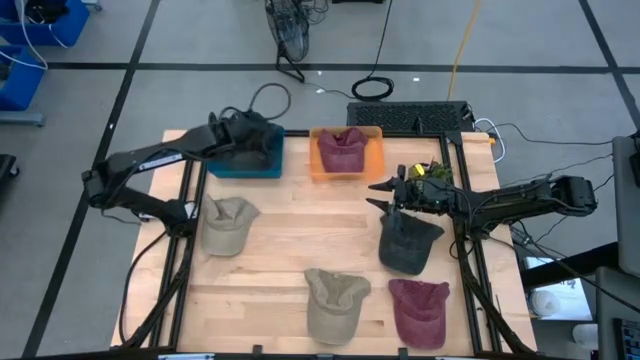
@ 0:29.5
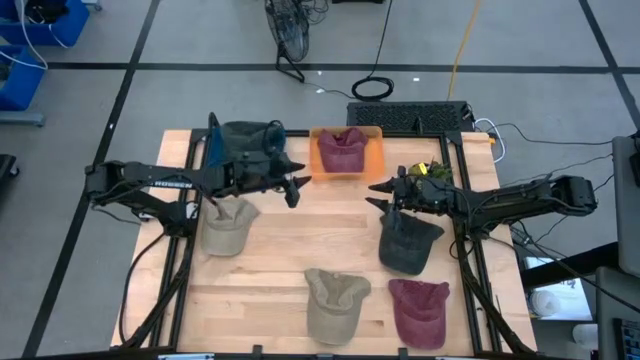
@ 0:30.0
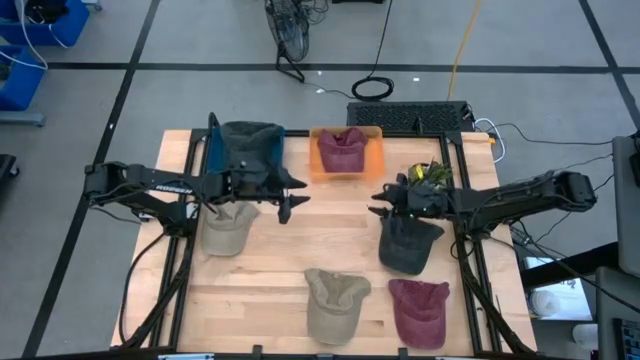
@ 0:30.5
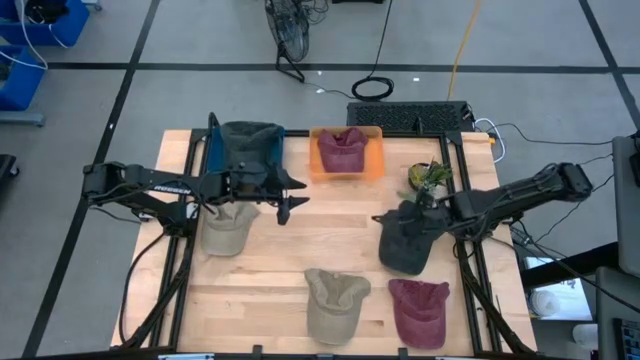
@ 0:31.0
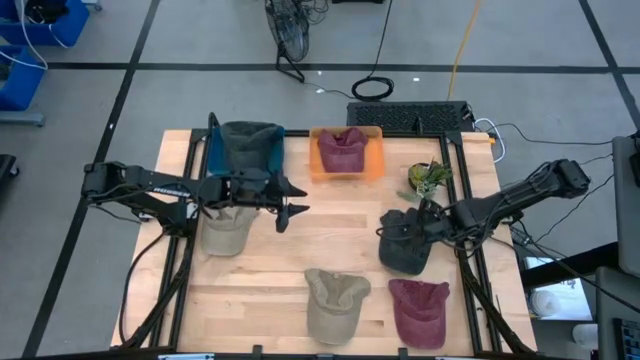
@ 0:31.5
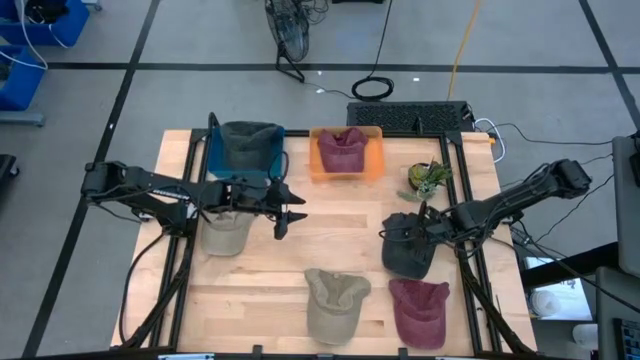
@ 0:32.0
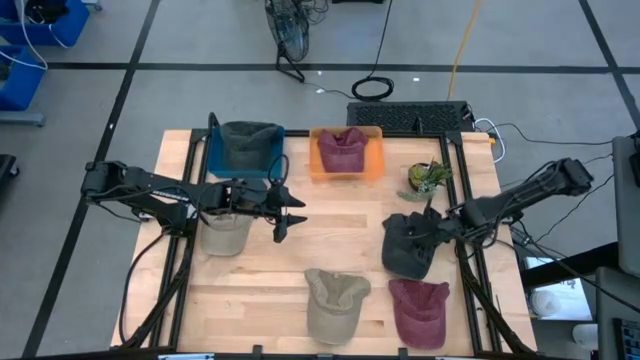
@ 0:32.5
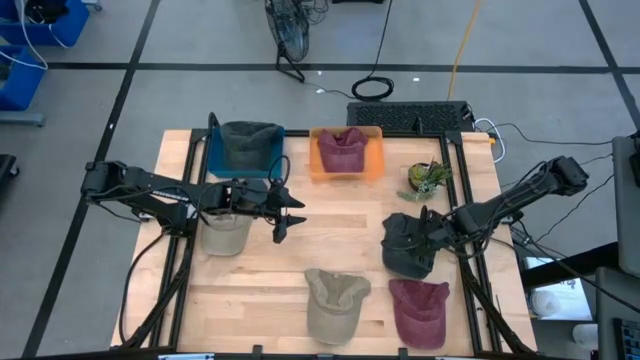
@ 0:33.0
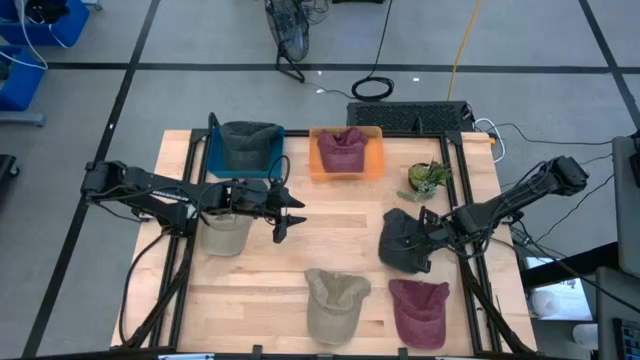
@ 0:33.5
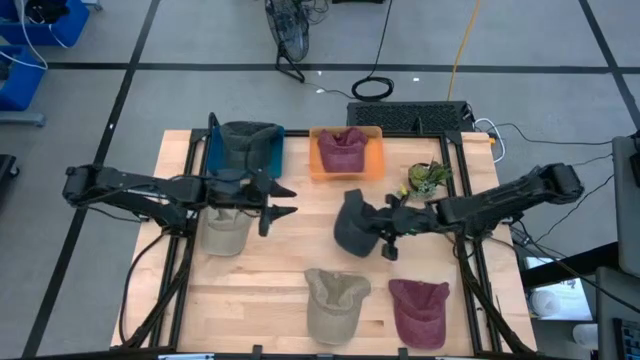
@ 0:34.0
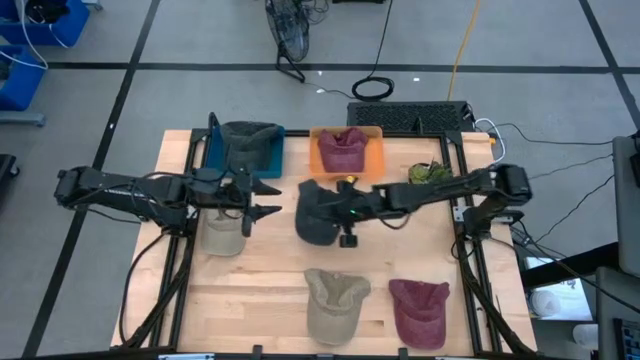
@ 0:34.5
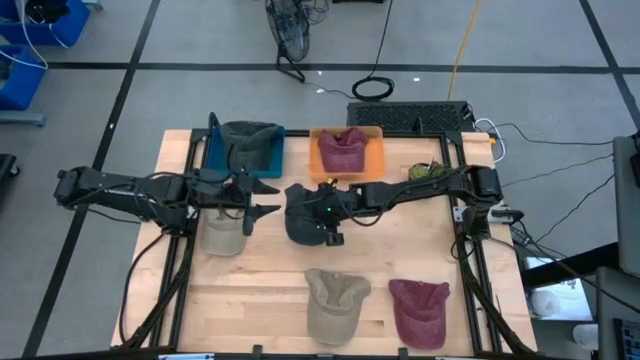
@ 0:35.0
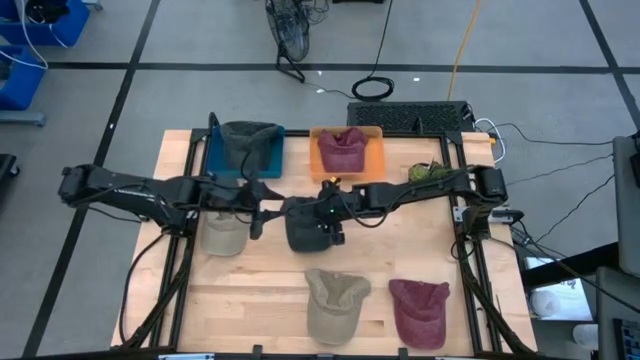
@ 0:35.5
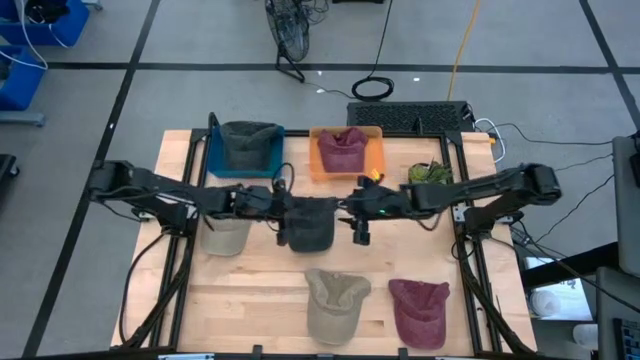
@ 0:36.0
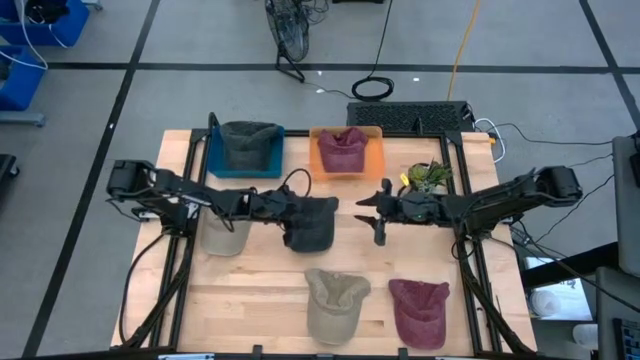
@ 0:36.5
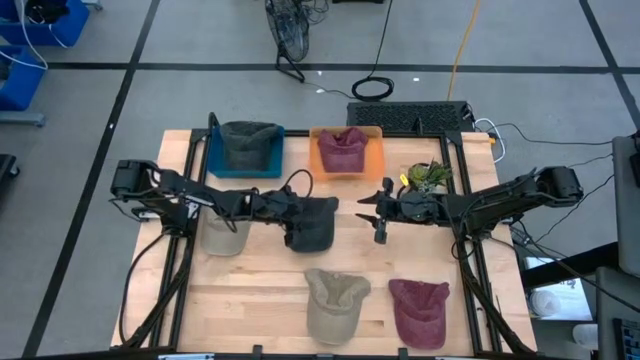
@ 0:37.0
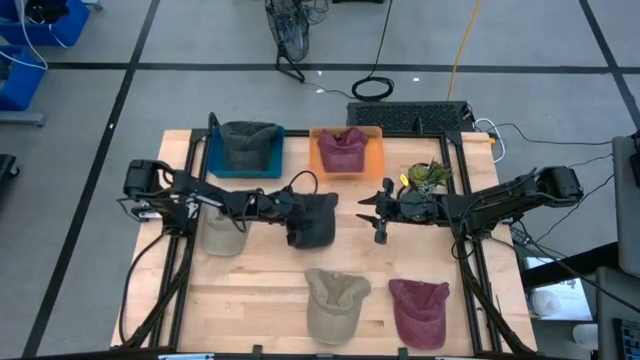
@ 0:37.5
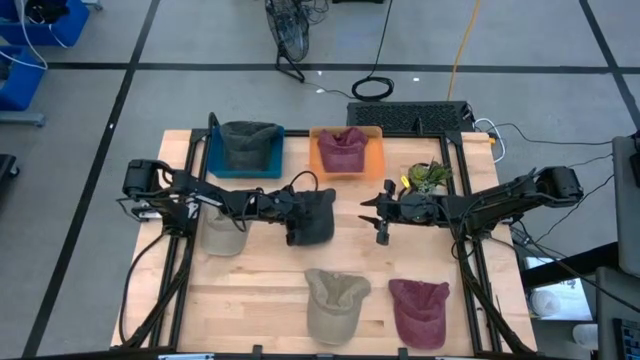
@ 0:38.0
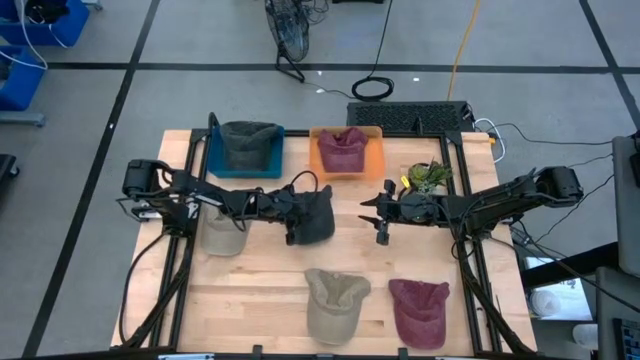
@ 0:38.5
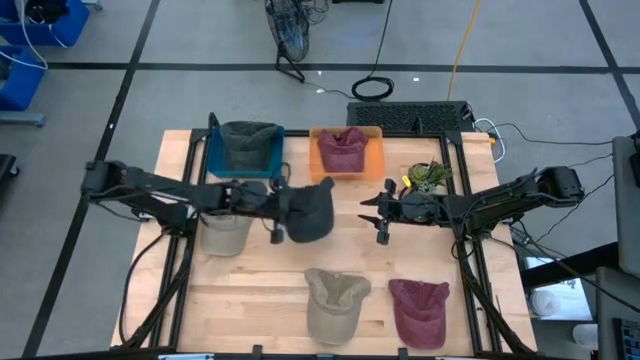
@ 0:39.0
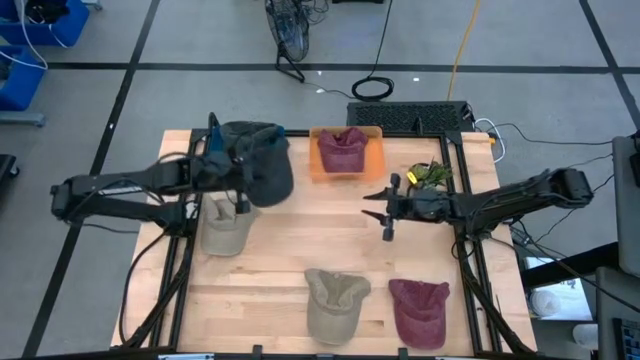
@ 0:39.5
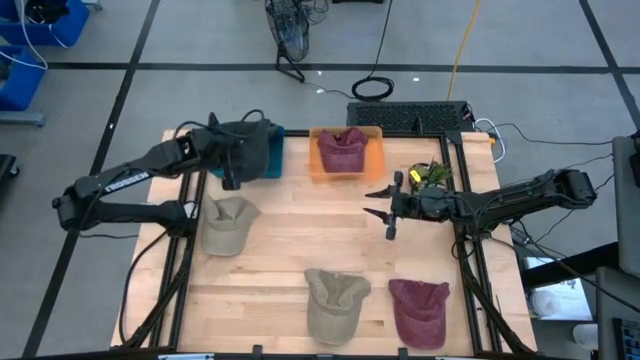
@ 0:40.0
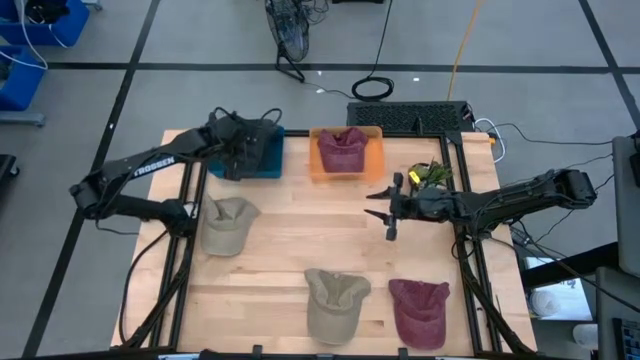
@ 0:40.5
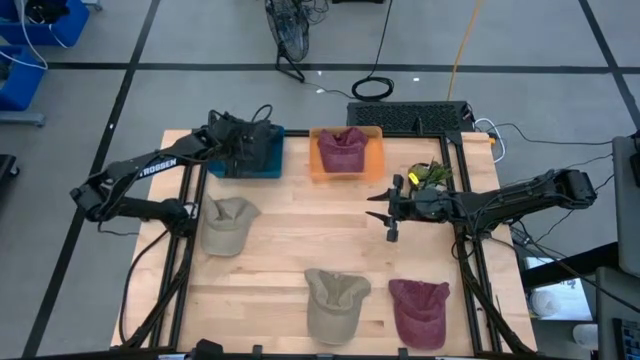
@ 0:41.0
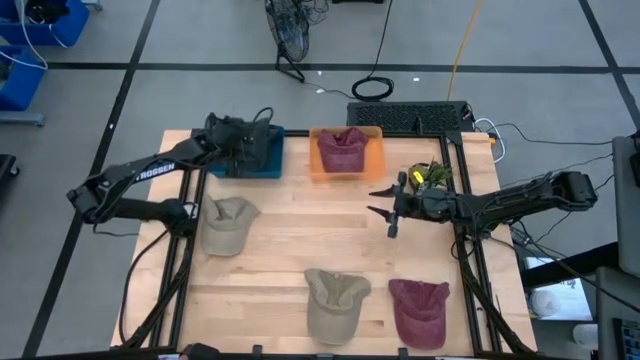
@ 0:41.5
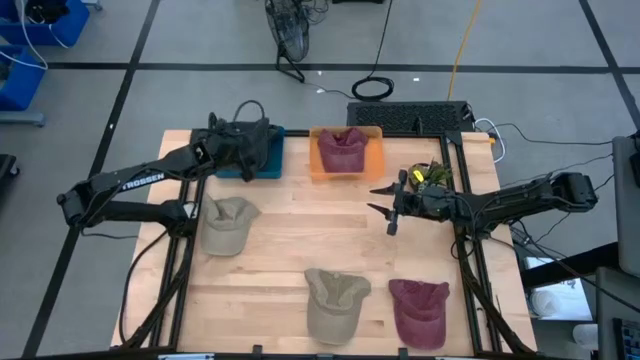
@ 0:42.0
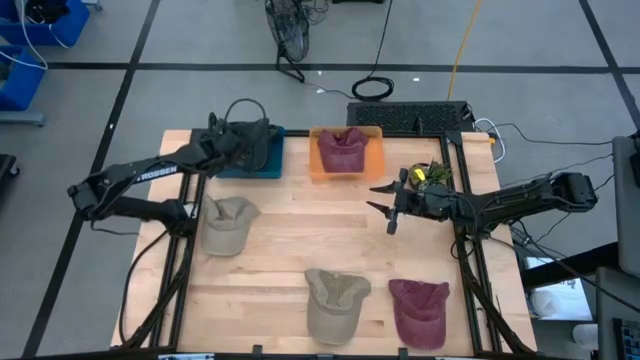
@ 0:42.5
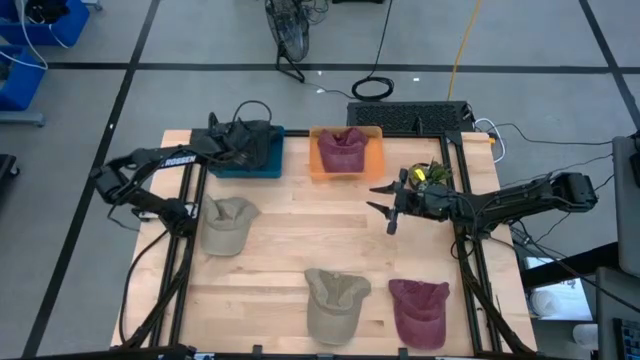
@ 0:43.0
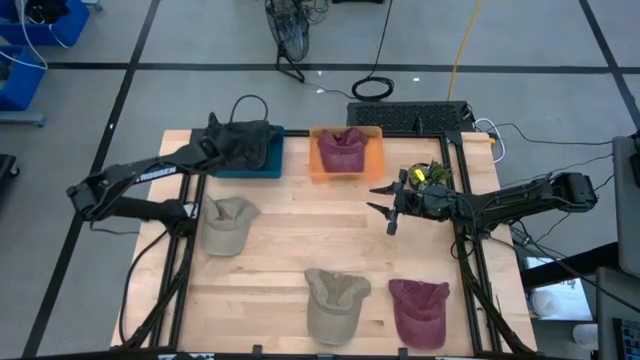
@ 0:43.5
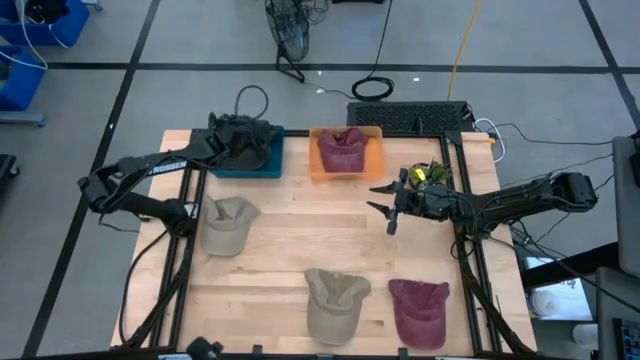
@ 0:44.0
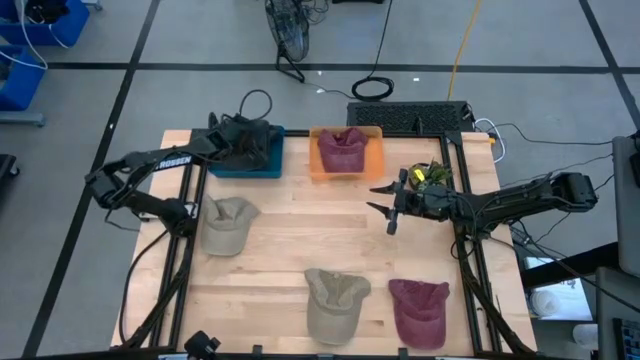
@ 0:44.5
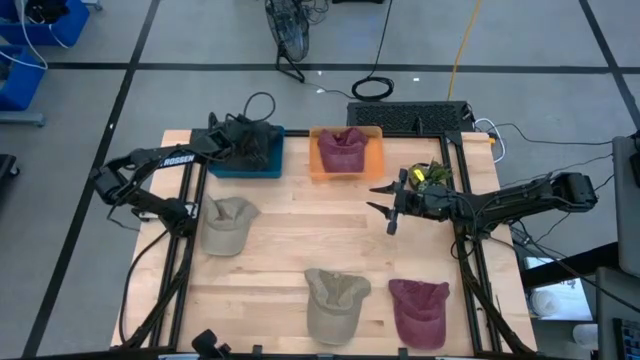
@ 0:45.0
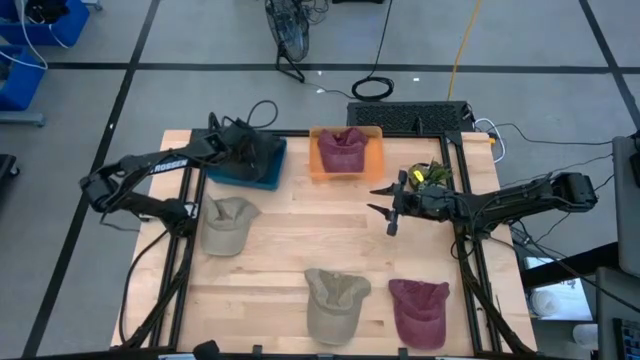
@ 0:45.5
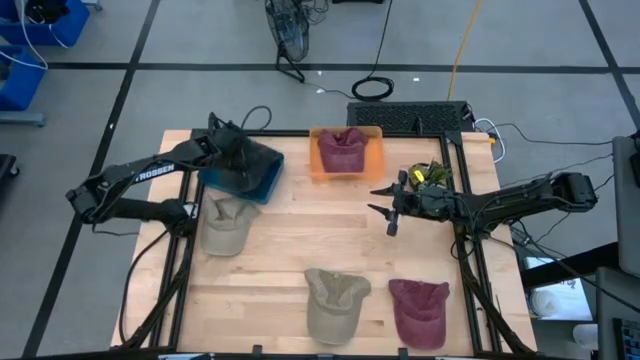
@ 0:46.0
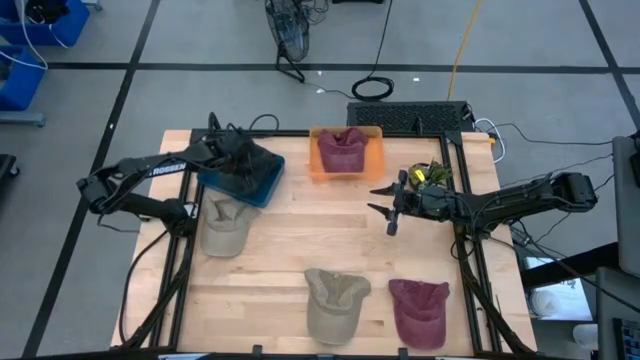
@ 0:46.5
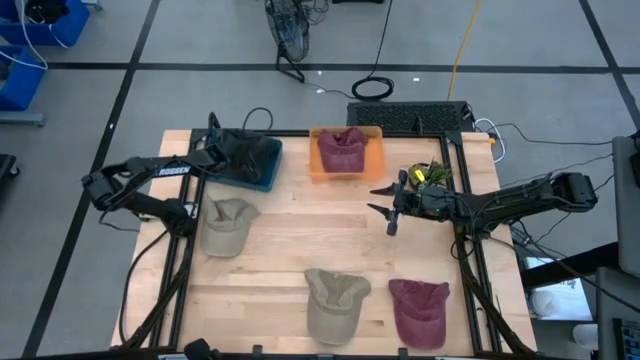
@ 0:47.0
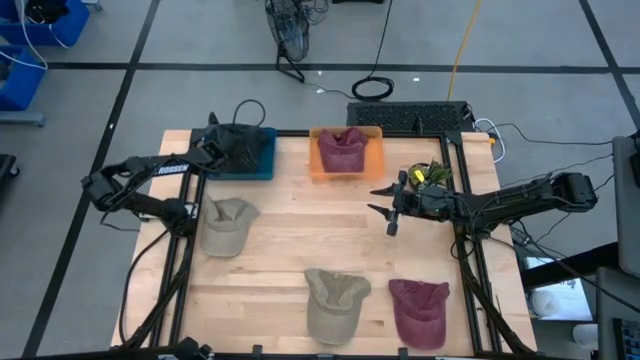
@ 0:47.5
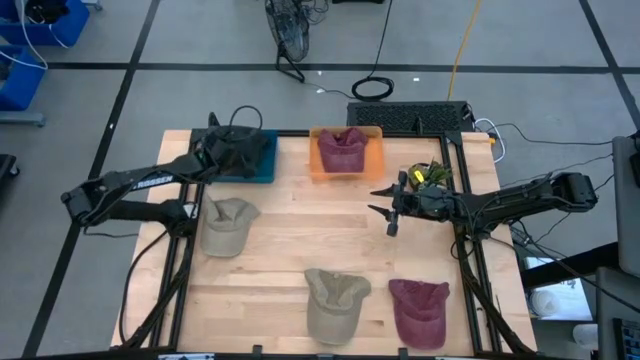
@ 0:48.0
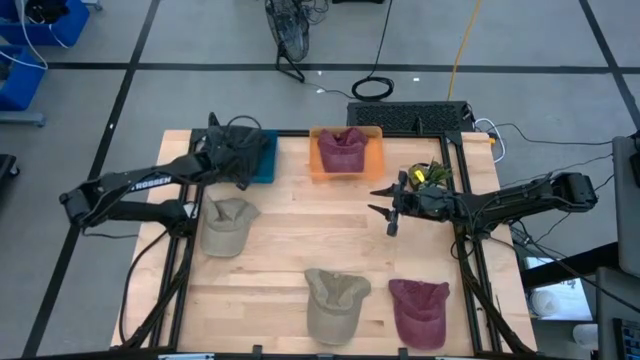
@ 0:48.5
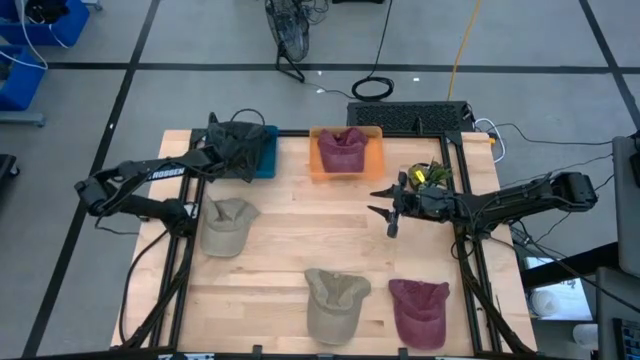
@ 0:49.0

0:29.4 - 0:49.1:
Task: Pick & Place hat
Put the black cap into the blue bin
